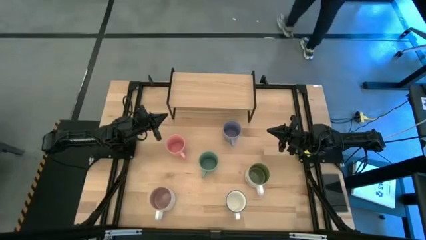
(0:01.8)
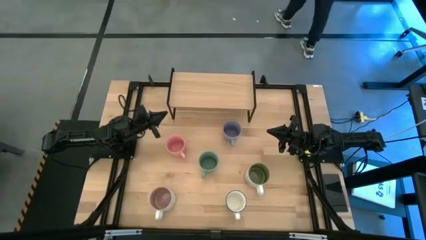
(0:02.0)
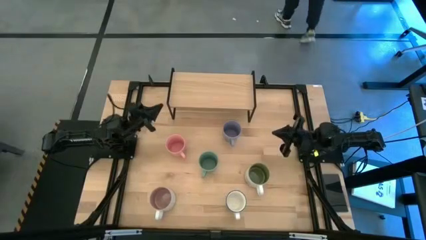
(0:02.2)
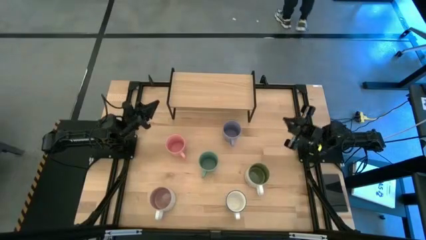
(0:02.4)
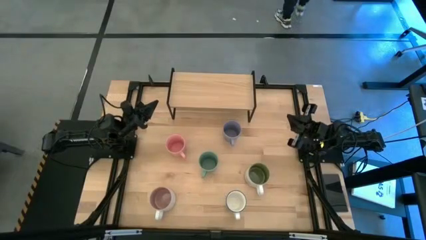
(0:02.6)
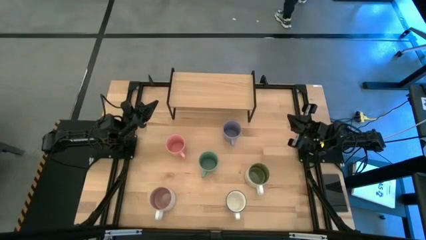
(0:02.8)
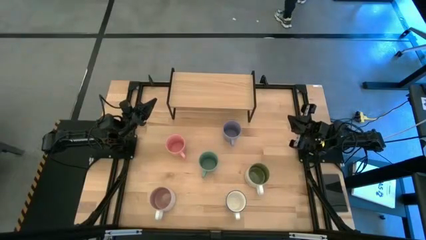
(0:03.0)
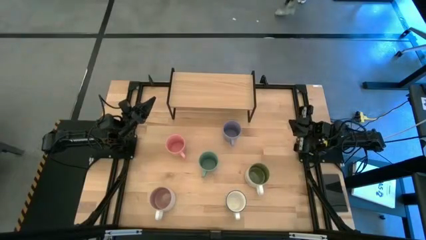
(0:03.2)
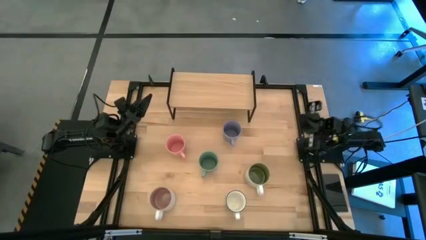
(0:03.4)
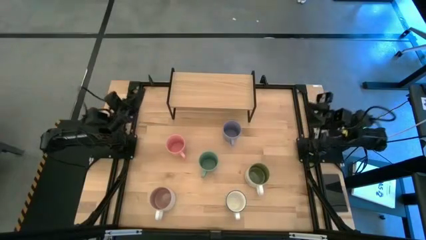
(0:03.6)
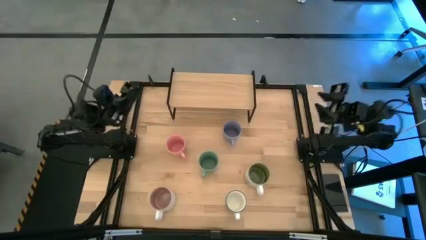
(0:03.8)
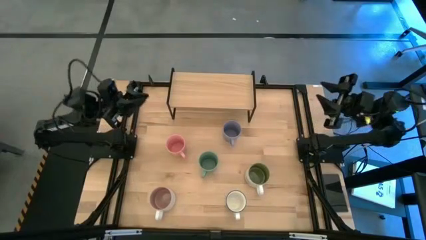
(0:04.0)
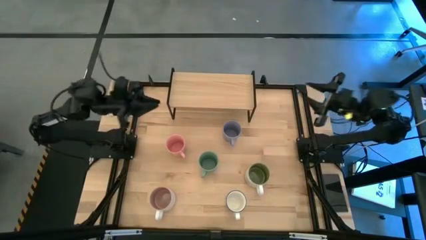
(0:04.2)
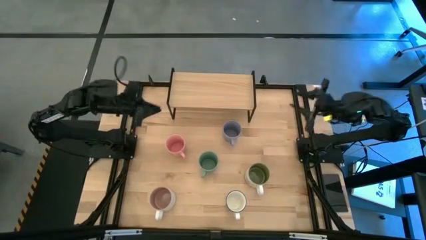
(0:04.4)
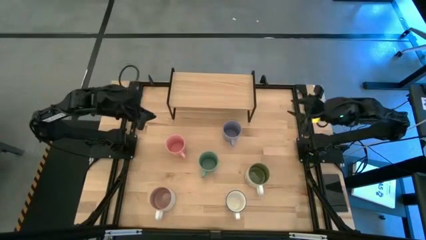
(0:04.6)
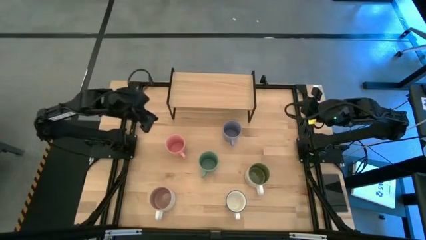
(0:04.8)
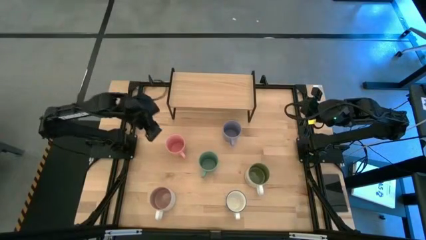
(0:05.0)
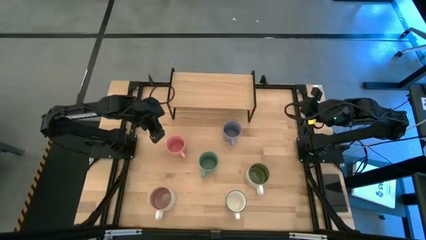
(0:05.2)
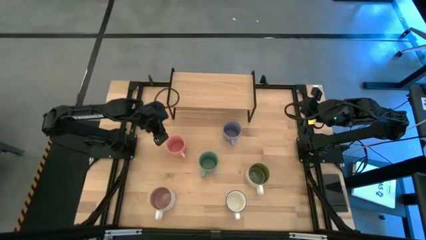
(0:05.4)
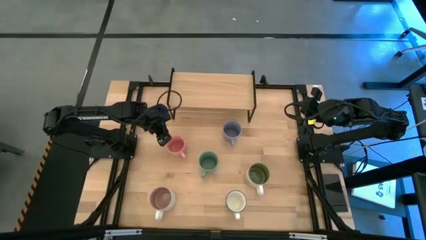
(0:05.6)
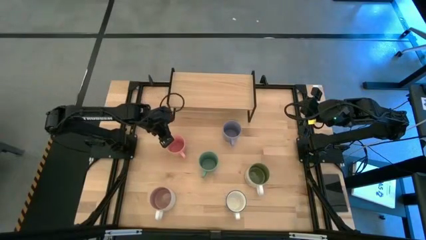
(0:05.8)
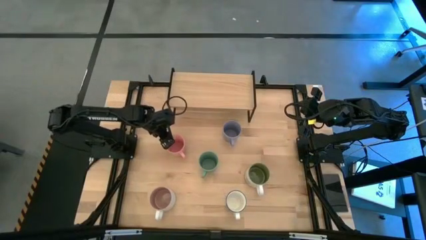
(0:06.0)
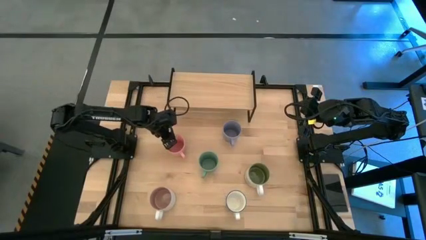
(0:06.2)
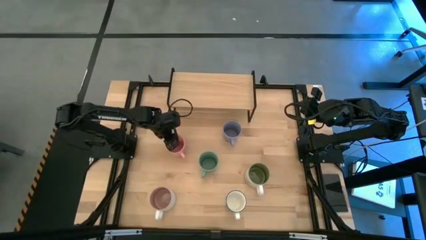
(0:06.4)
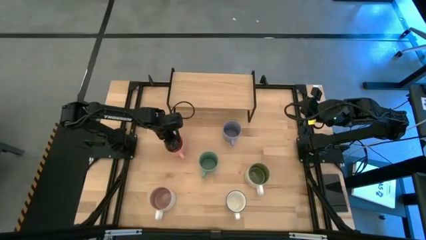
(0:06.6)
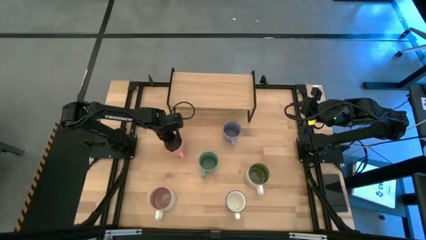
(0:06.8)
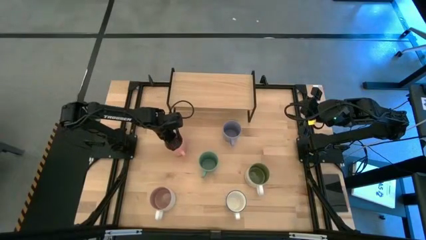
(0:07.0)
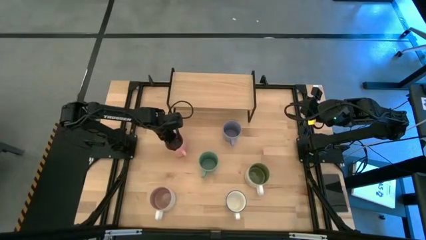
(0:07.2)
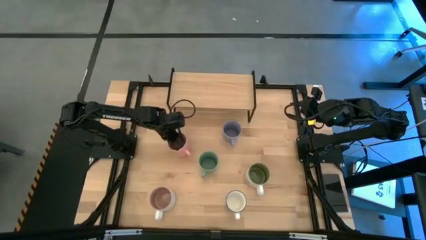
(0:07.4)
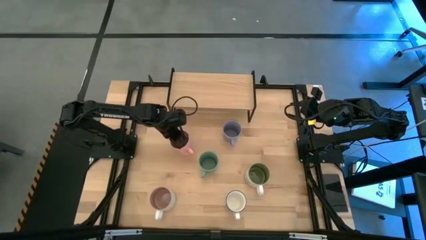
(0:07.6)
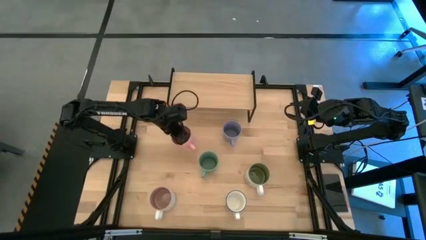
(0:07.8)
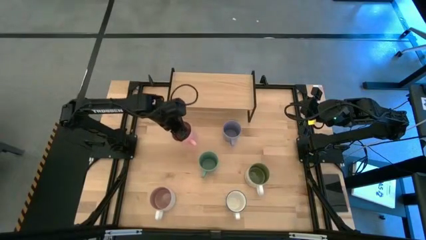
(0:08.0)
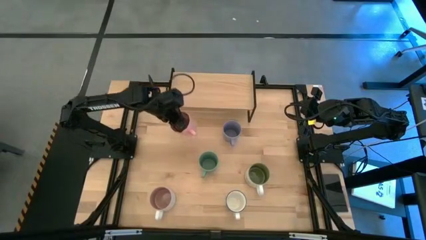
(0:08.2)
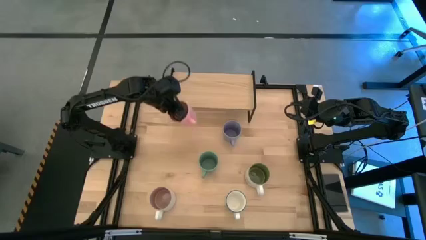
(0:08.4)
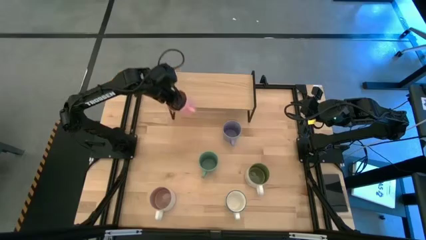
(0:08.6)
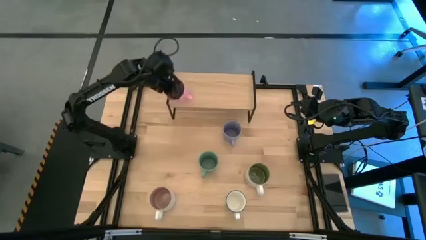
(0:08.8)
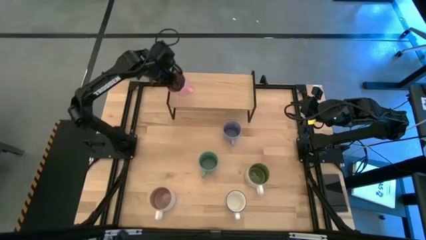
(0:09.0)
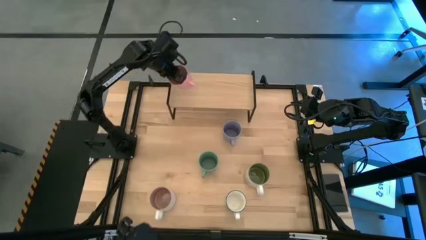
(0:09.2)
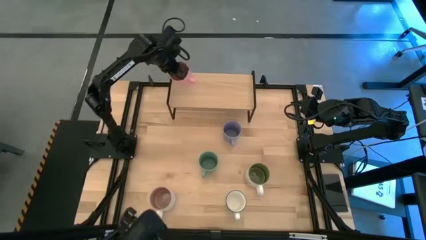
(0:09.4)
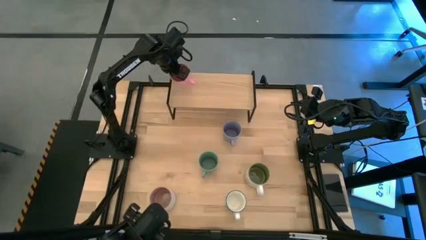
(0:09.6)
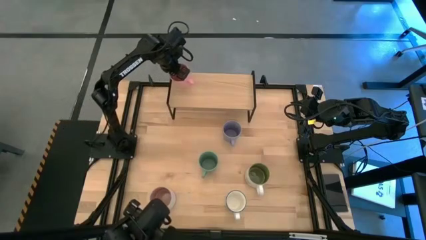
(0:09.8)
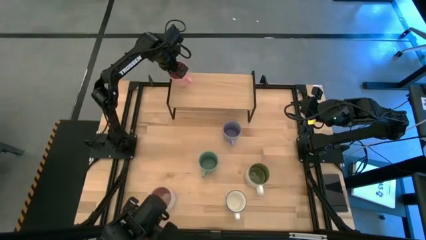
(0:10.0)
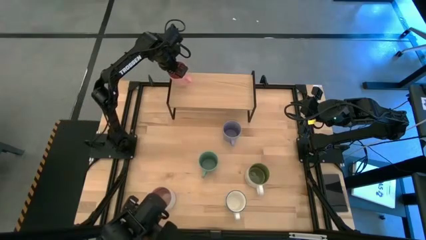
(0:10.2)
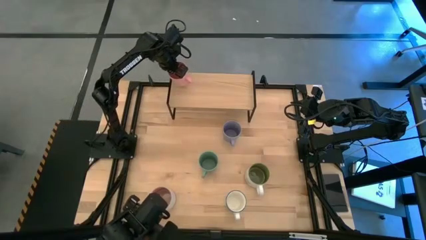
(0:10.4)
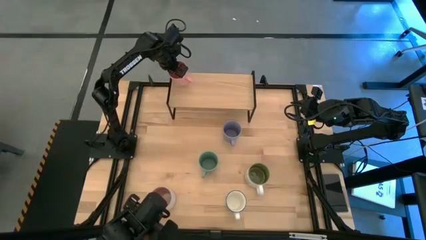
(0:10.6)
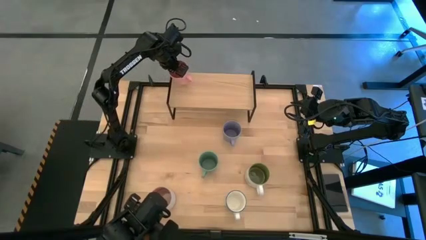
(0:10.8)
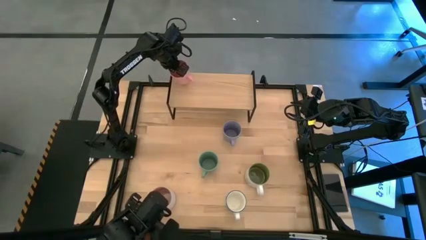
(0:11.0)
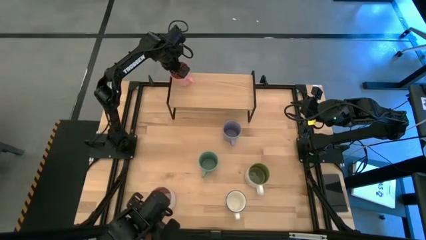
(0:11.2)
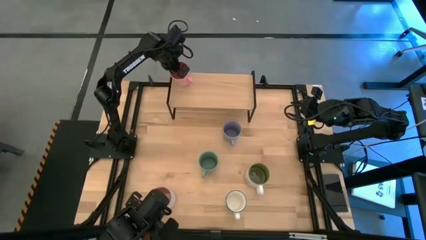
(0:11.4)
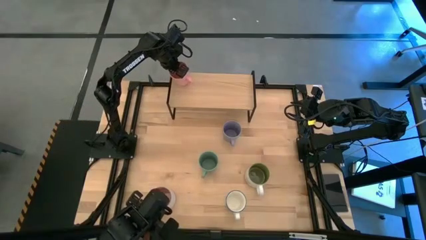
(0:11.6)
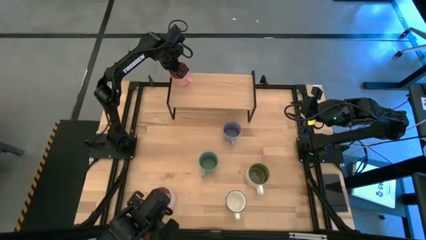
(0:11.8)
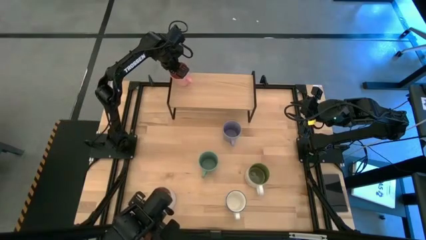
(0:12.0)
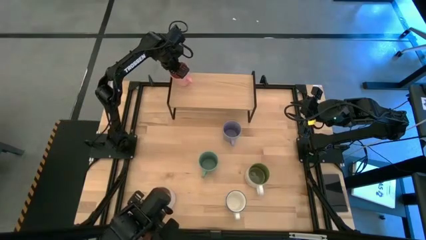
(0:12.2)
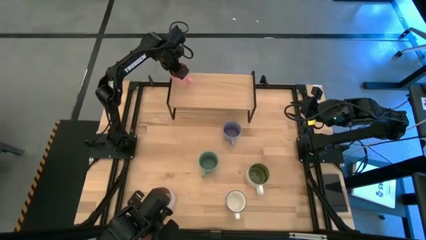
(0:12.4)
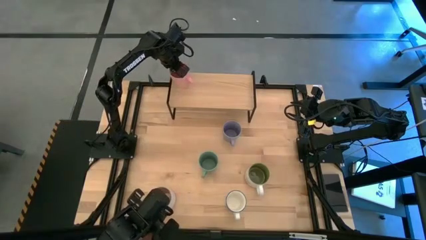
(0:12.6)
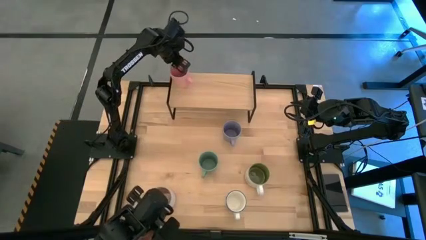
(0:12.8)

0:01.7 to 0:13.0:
Task: Place coffee mugs
Put the pink mug on the shelf
